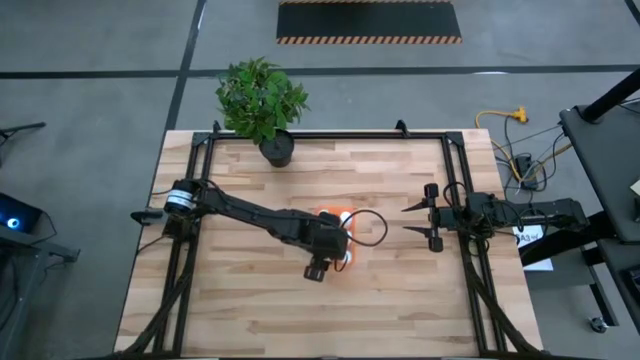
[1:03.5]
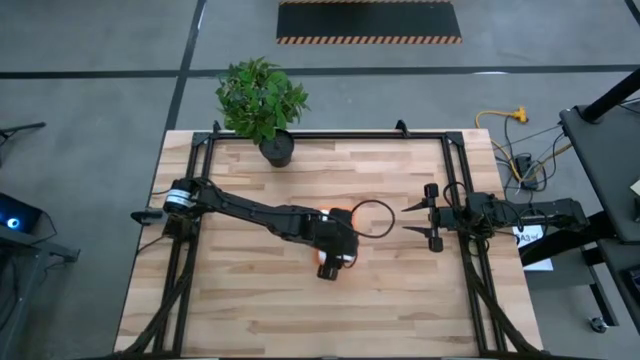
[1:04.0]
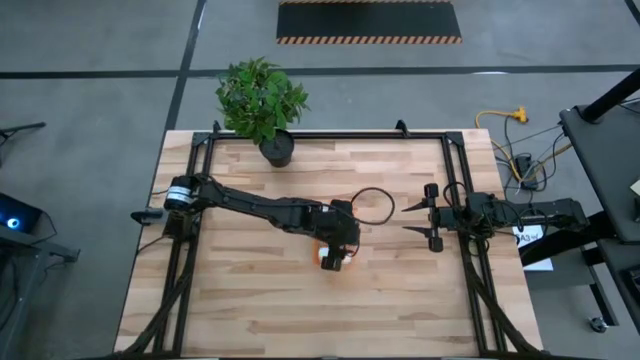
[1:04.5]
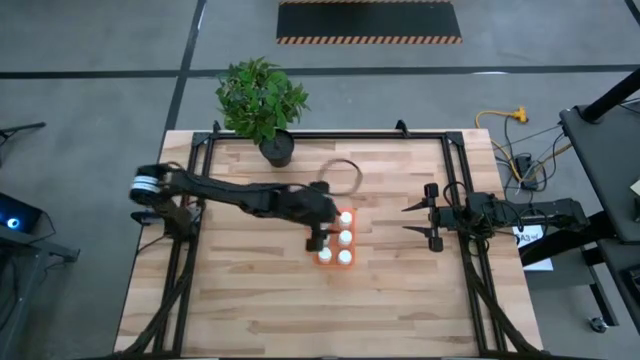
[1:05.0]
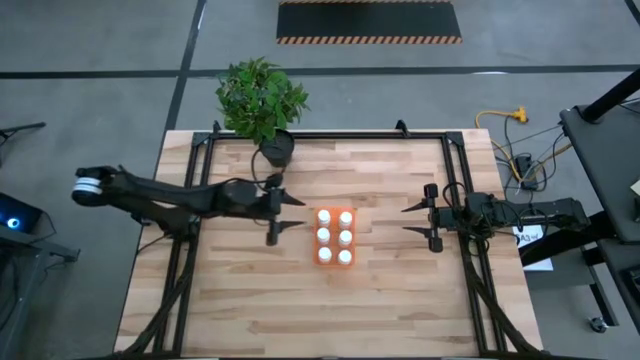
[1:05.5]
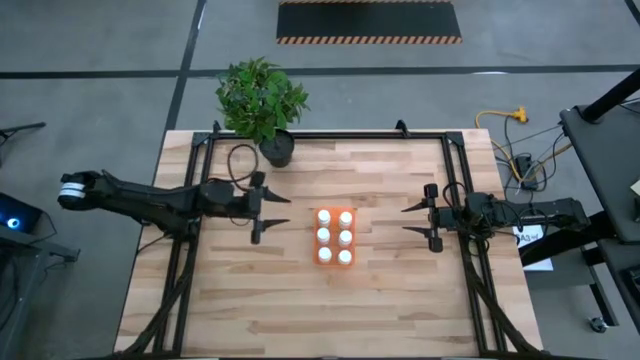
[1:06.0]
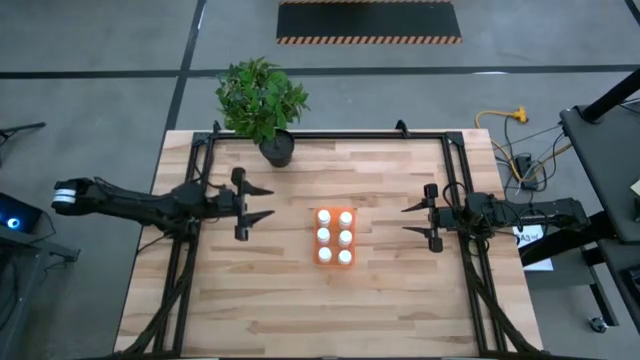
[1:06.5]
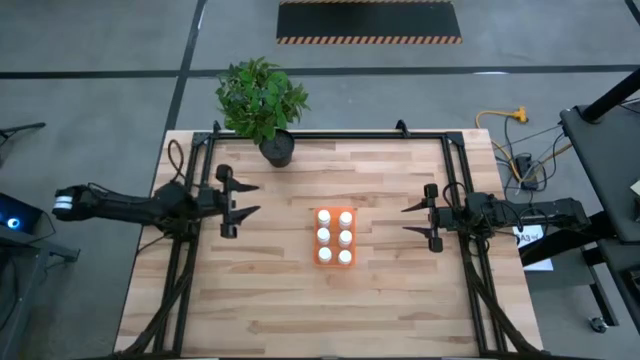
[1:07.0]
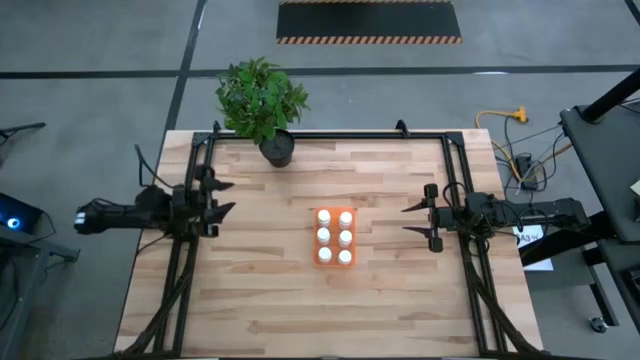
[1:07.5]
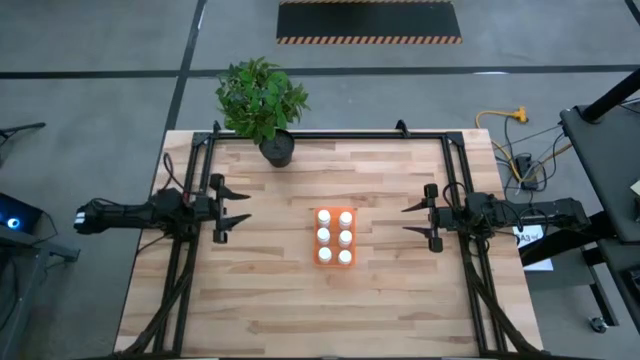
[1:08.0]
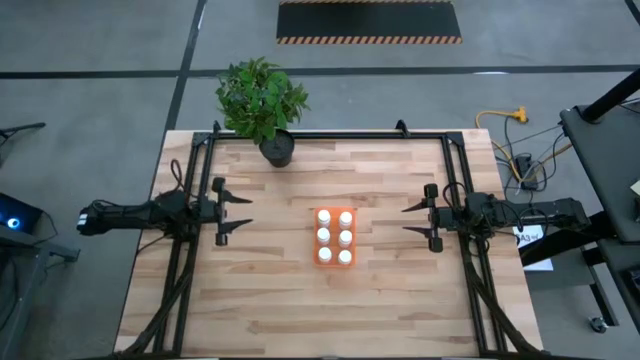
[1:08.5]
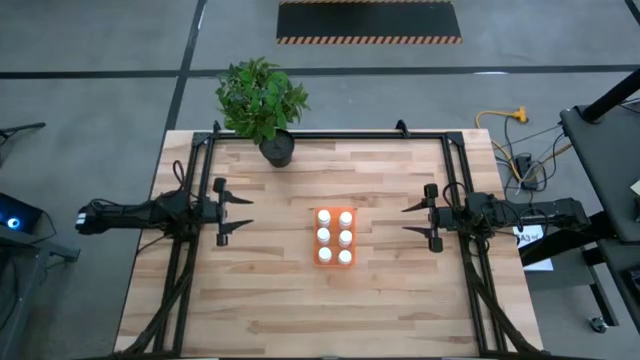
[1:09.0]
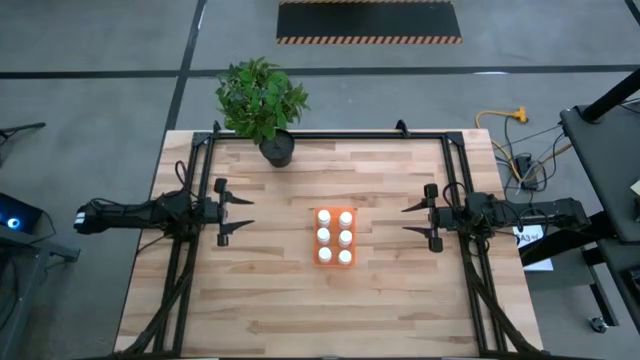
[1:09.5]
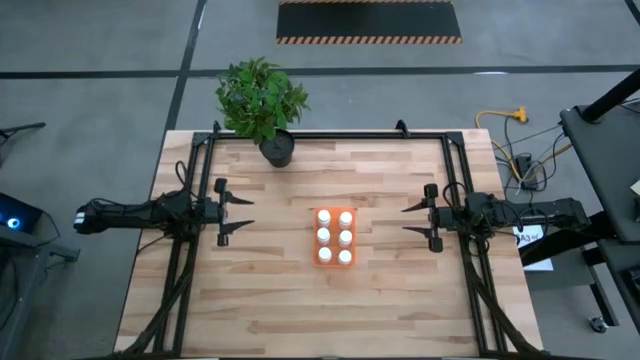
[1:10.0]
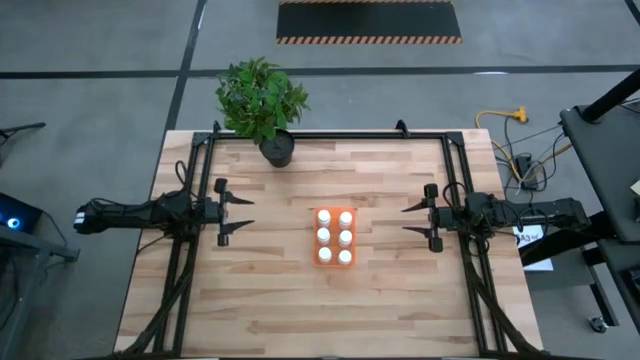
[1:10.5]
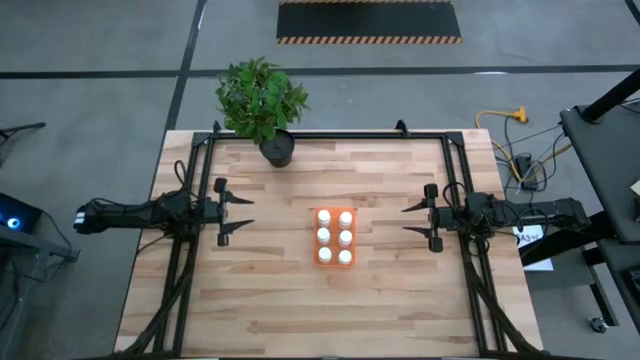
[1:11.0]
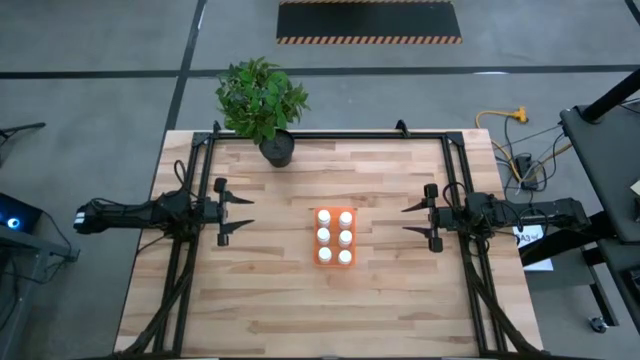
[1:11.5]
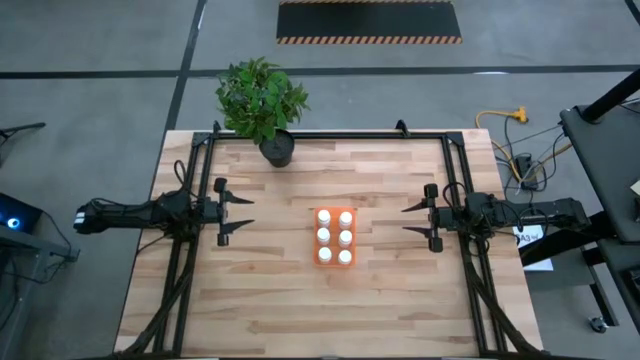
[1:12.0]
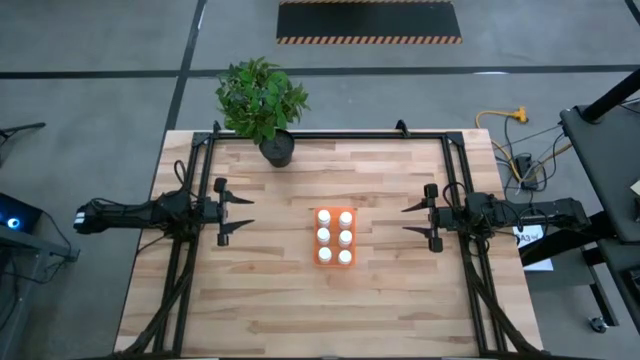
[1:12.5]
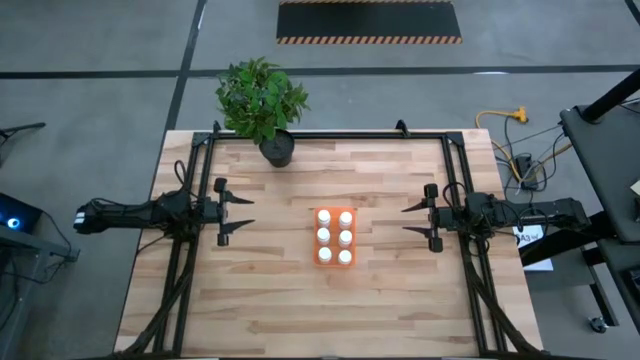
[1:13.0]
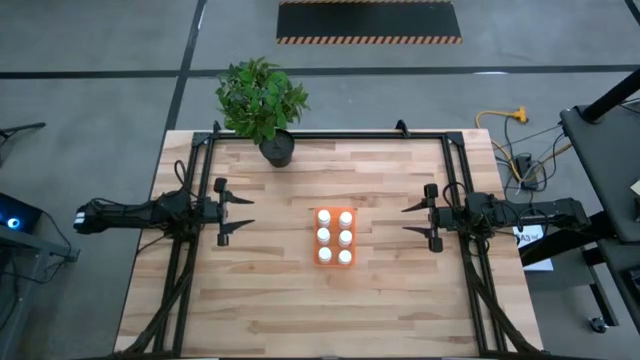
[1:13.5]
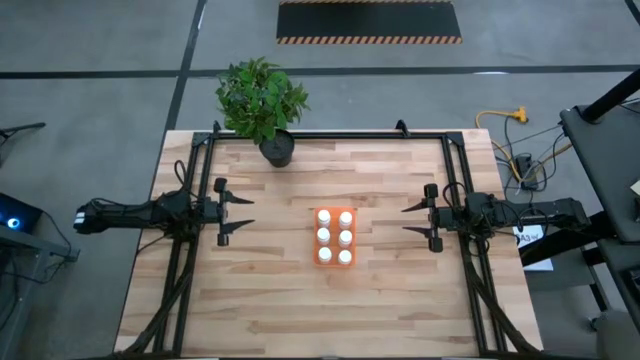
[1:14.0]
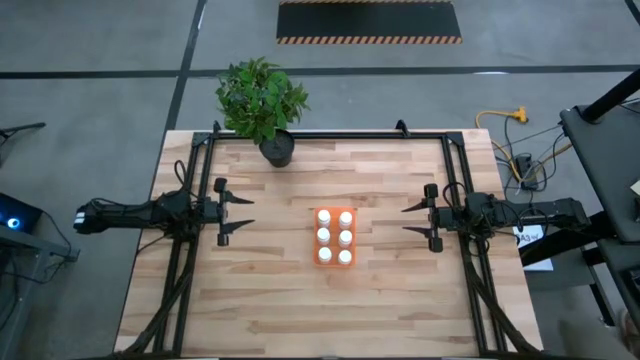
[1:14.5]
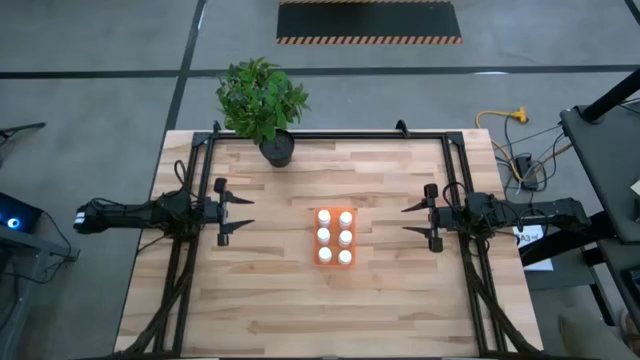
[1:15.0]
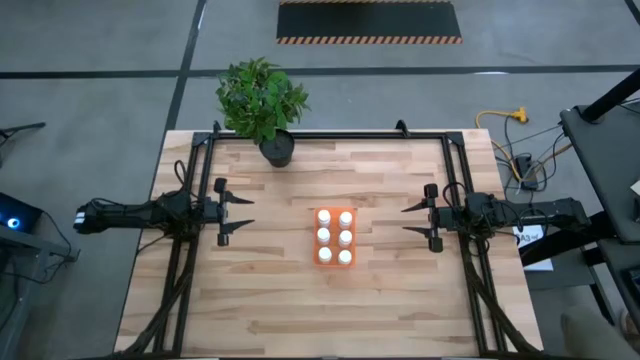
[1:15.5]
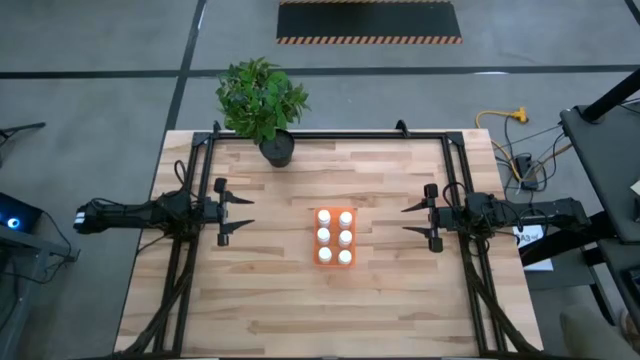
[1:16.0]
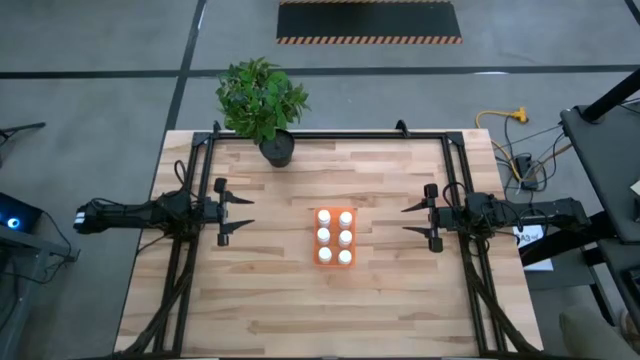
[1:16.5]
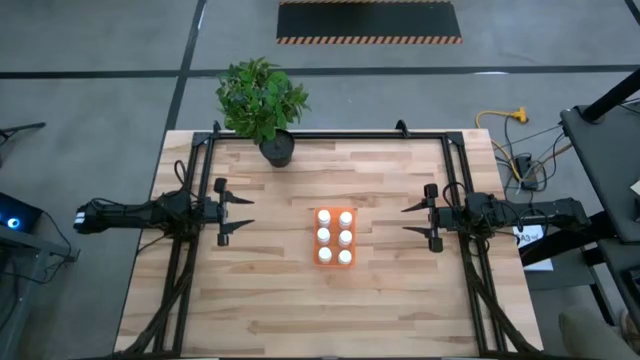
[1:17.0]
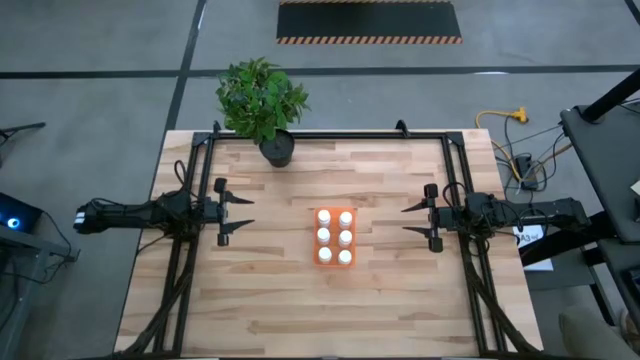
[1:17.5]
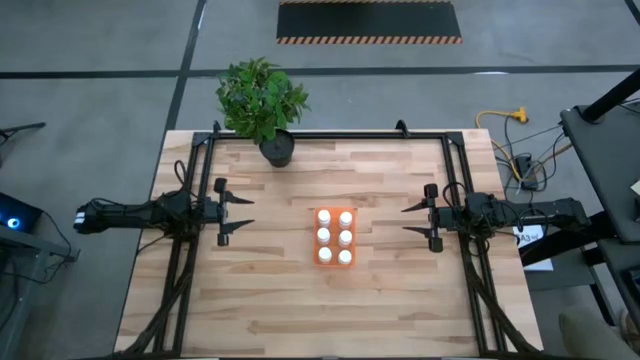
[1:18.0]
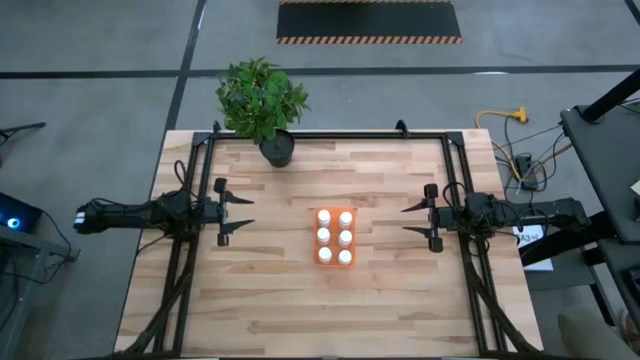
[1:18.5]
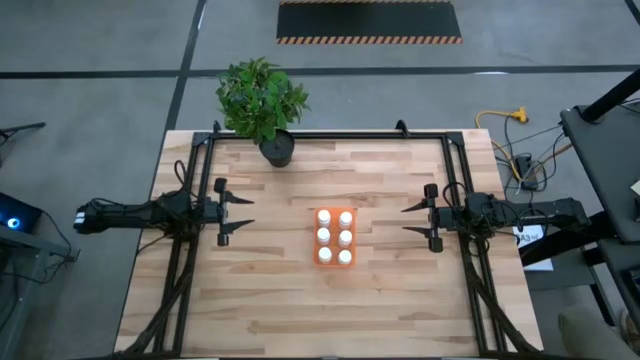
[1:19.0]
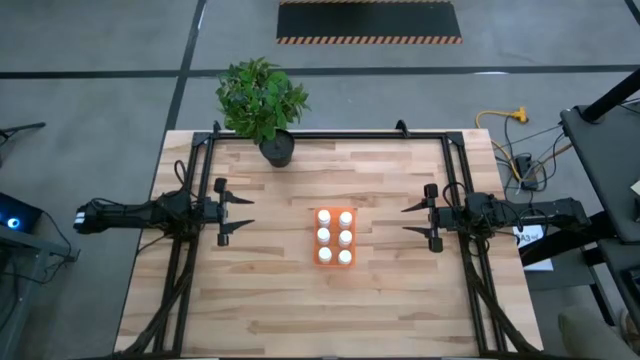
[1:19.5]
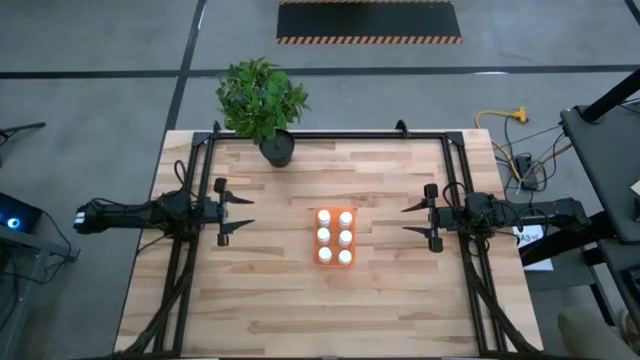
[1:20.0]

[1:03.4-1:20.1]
Task: Pick and place pill bottles into a basket
Return to Home Position

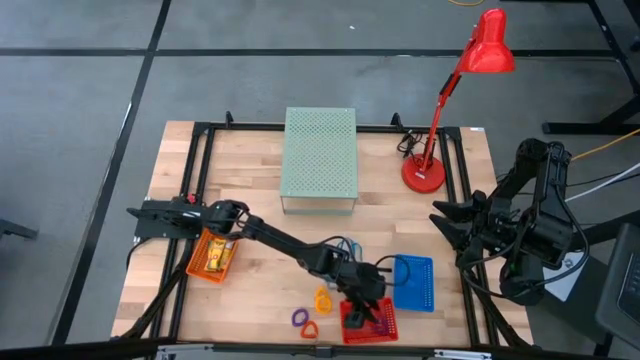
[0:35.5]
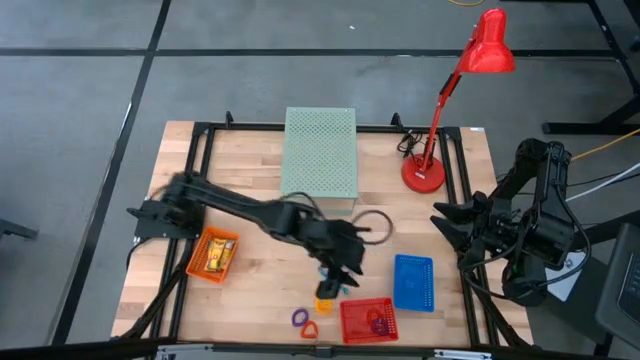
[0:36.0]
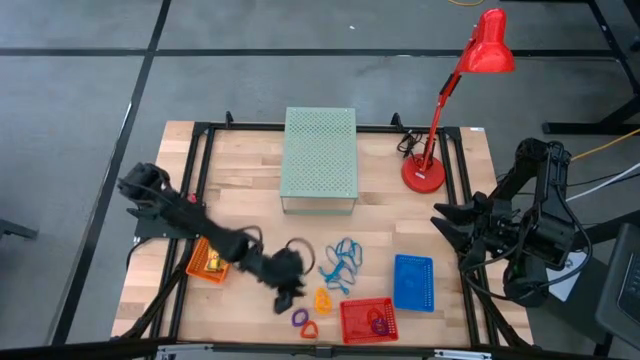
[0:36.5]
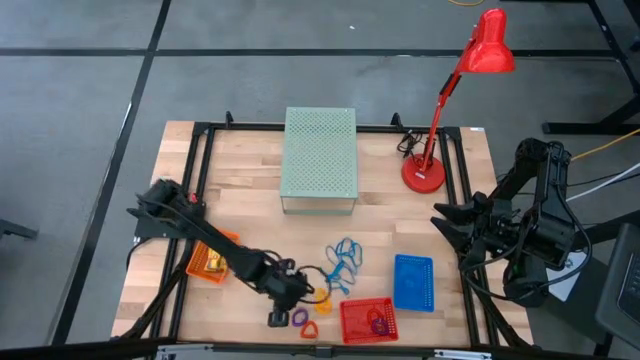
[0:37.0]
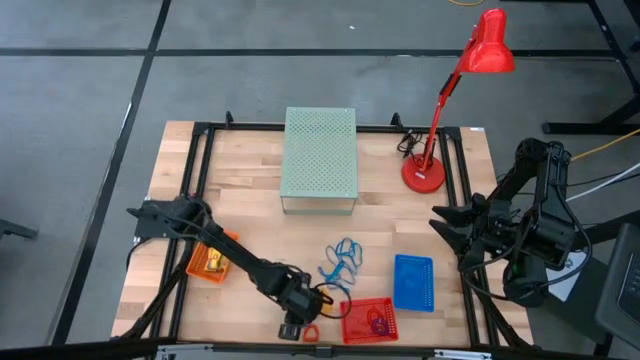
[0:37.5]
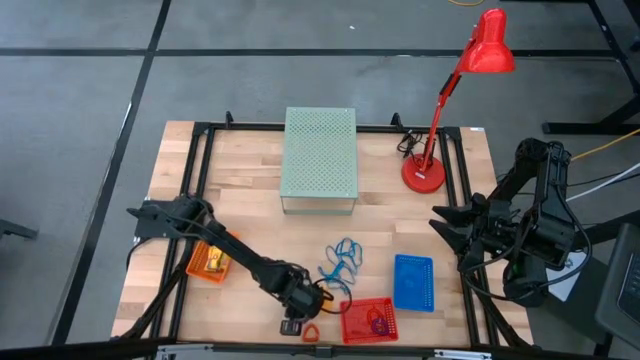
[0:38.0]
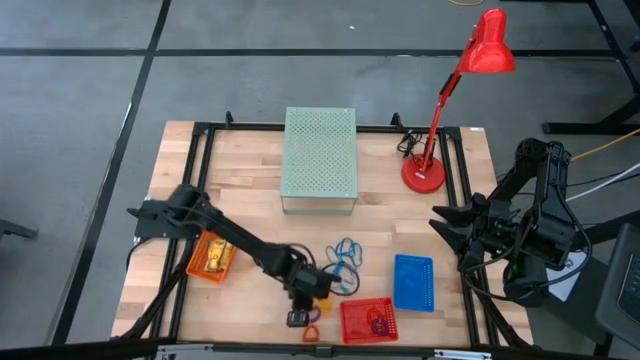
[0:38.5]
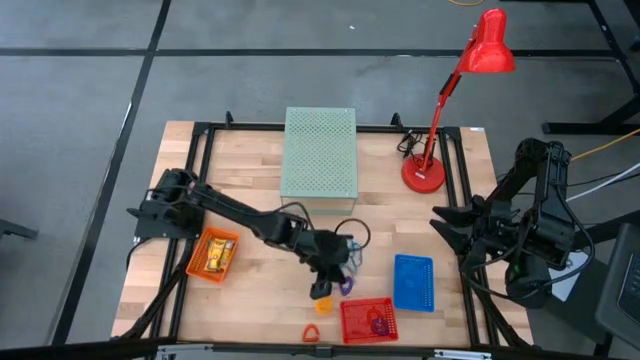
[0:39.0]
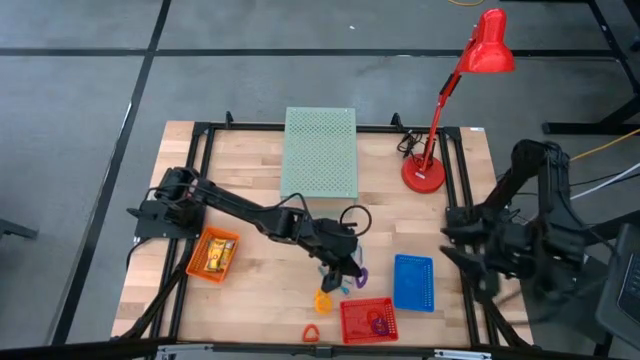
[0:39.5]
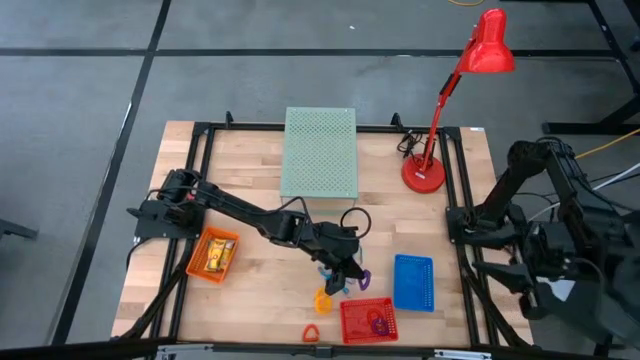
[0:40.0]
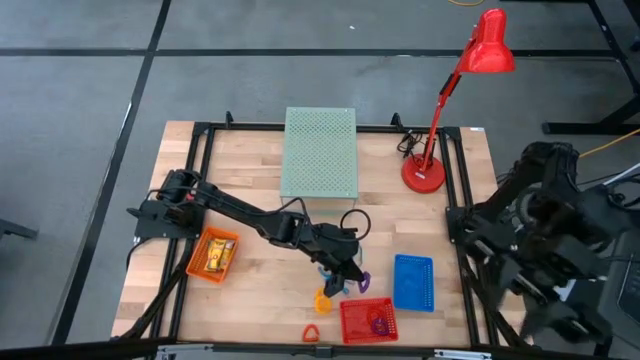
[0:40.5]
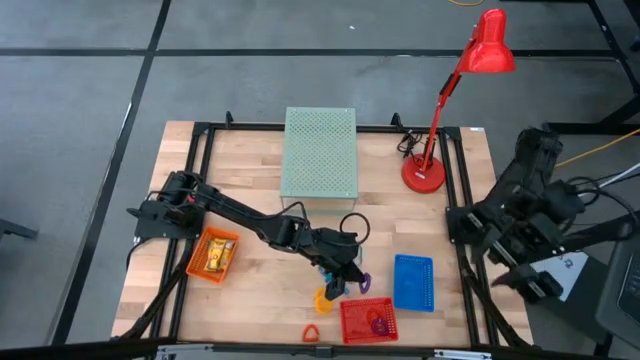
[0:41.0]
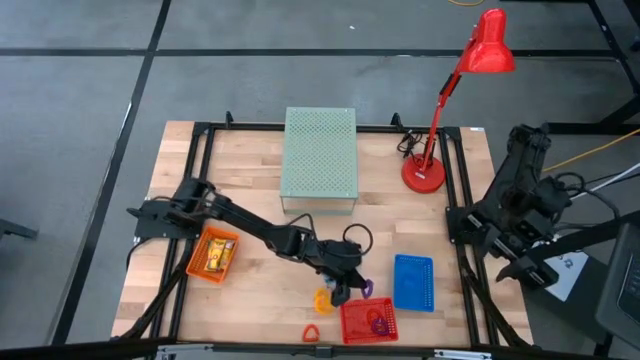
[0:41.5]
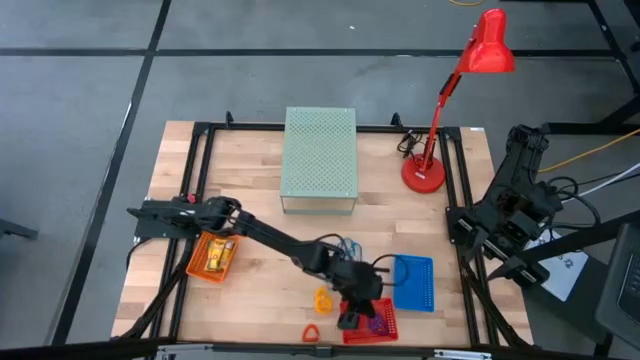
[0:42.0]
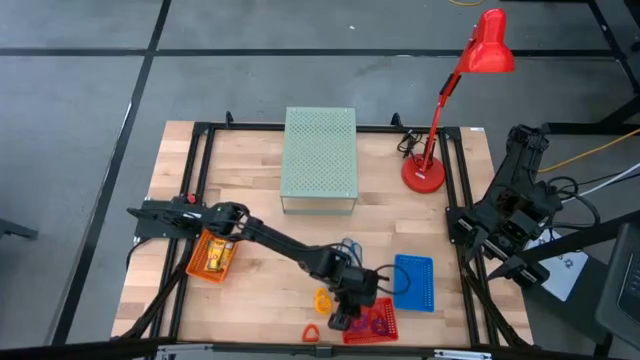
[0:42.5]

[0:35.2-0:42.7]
Task: Pick & Place Office Desk Supplies
Put the violet coil keychain into the red bin
